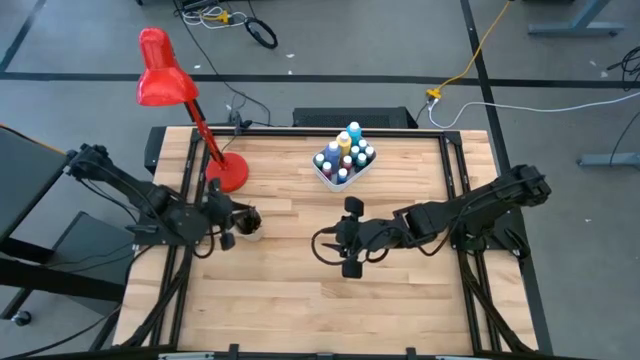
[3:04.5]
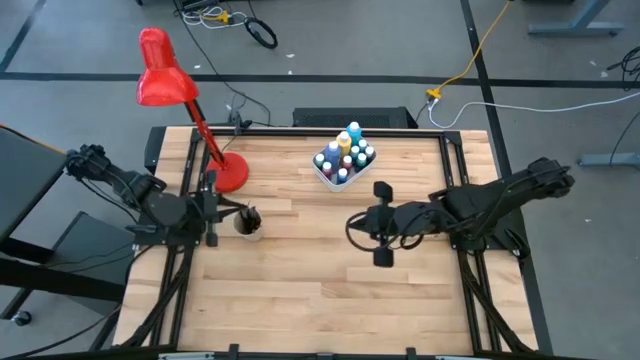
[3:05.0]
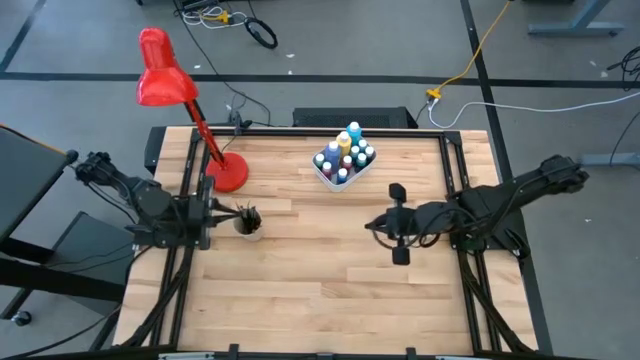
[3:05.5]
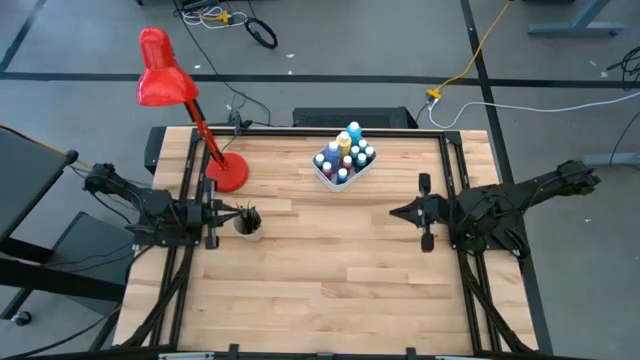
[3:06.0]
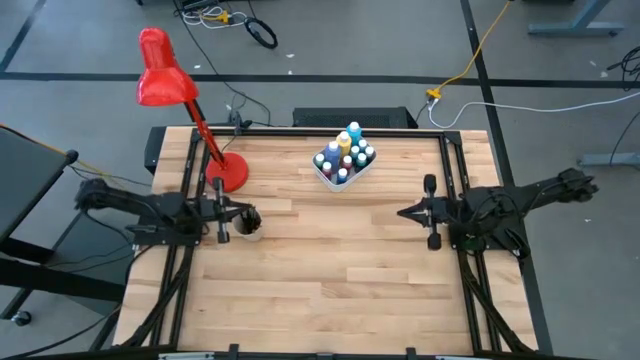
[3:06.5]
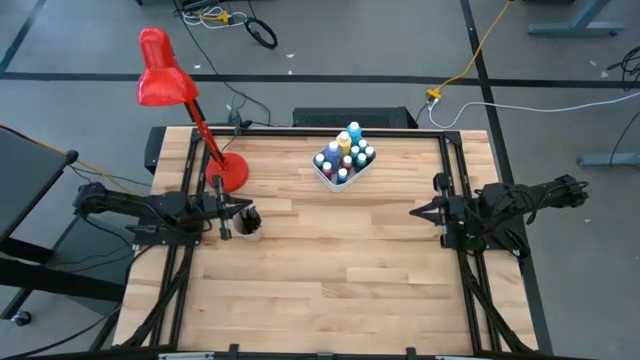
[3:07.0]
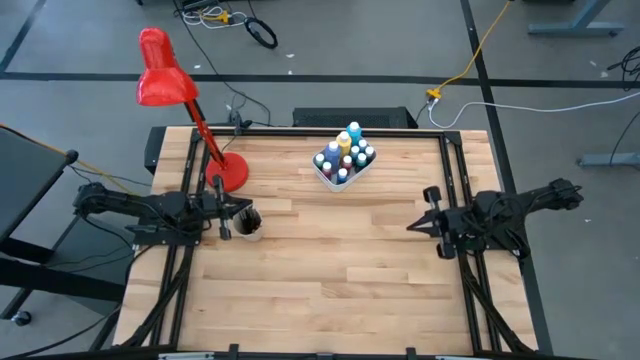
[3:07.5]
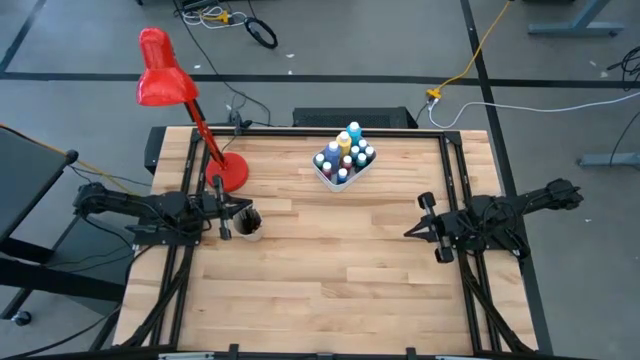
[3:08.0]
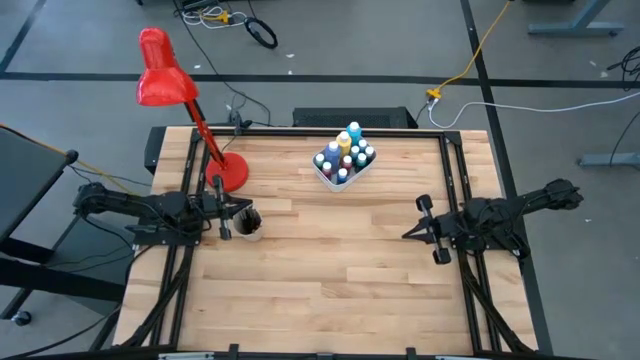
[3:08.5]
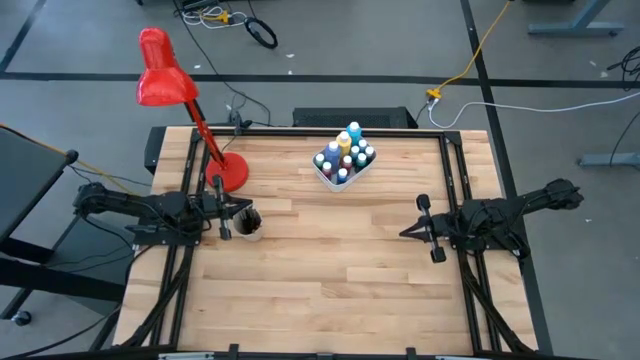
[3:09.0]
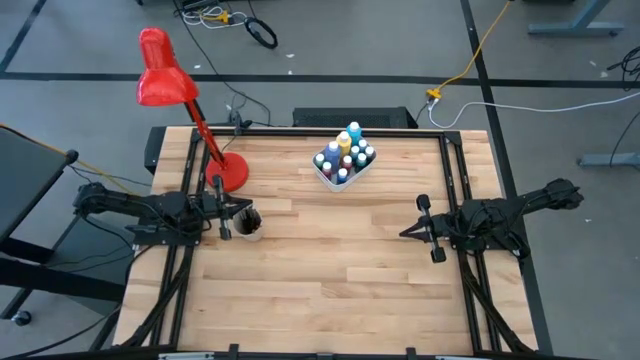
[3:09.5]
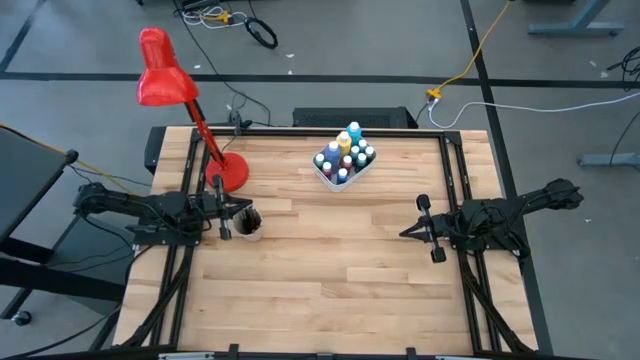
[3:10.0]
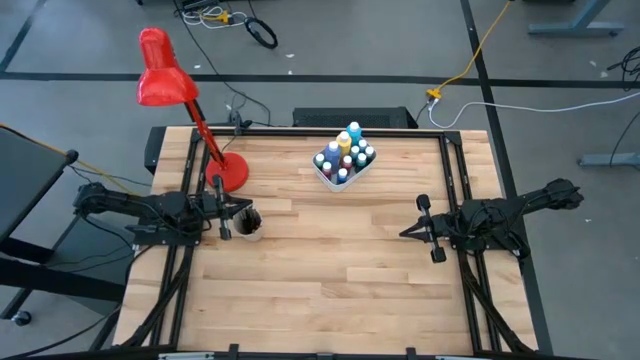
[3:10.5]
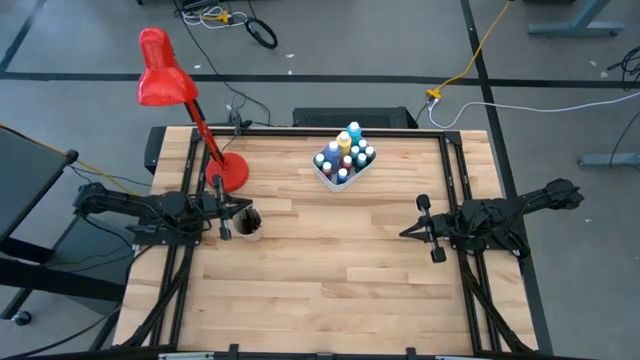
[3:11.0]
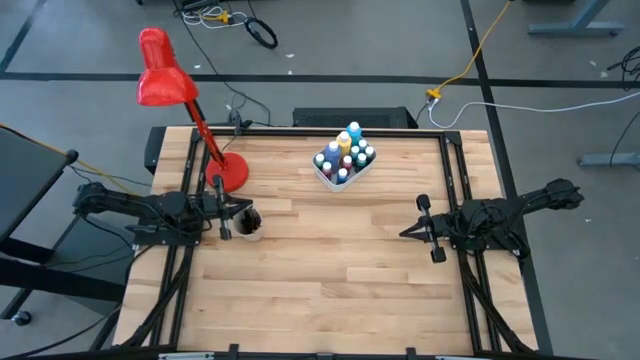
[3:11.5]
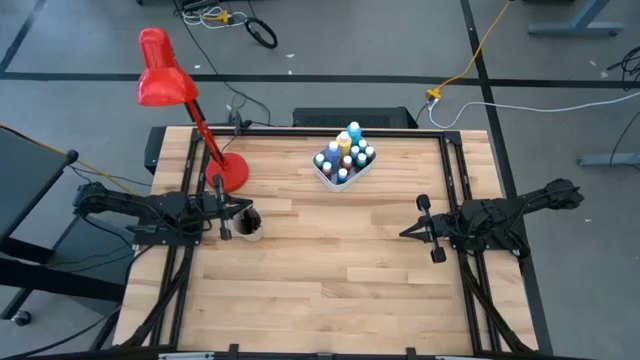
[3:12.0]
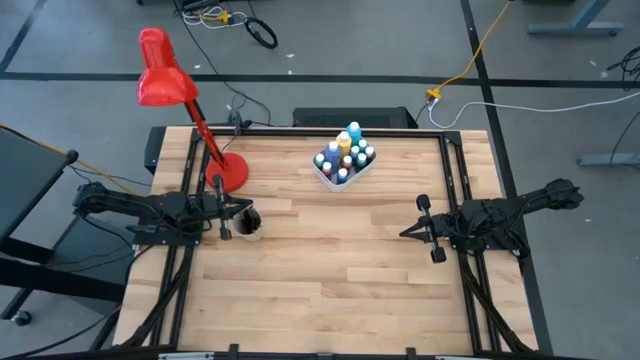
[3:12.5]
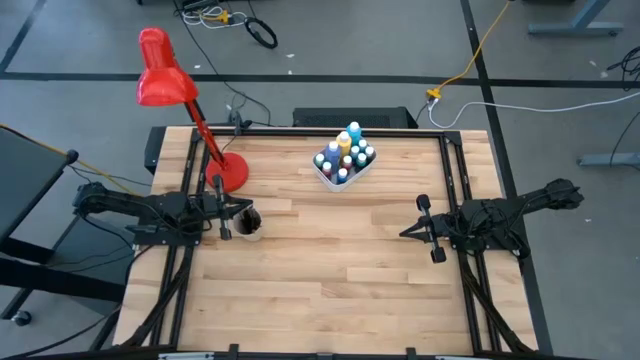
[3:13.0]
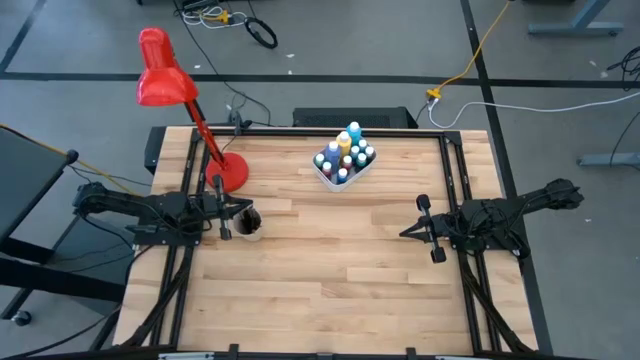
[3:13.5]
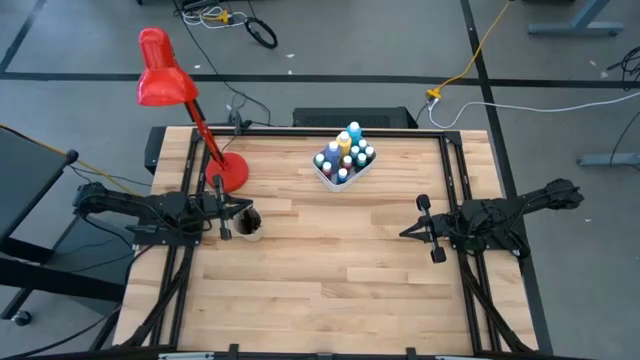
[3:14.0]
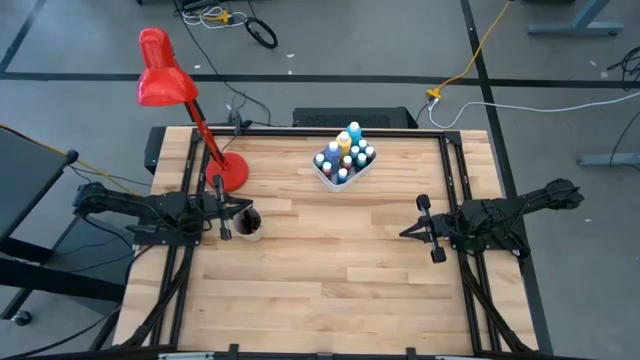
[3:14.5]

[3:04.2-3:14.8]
Task: Pick & Place Paint Supplies
Return to Home Position

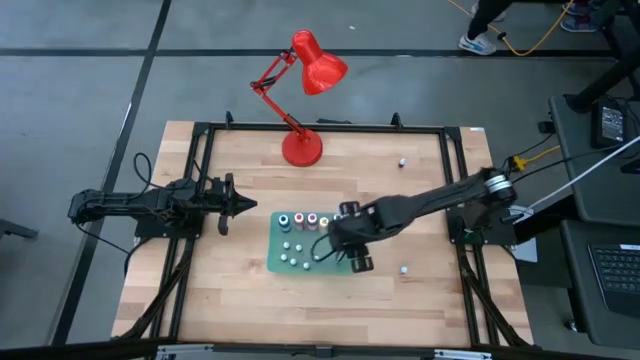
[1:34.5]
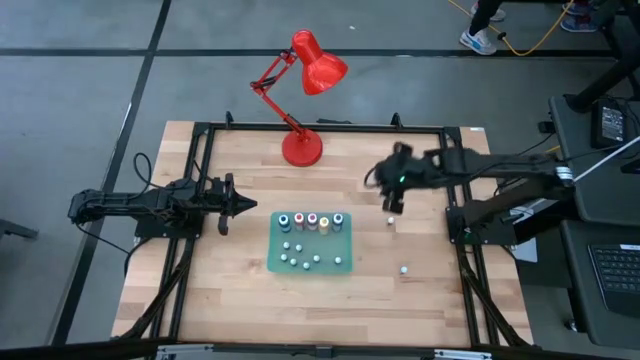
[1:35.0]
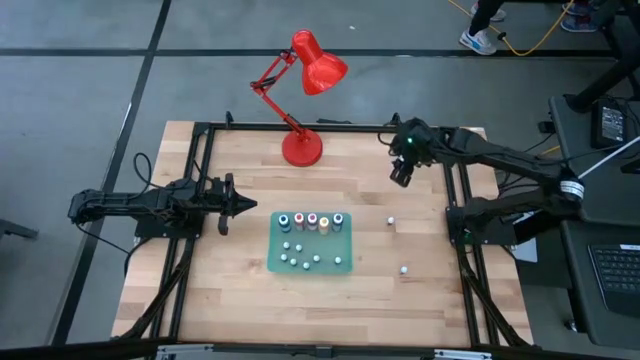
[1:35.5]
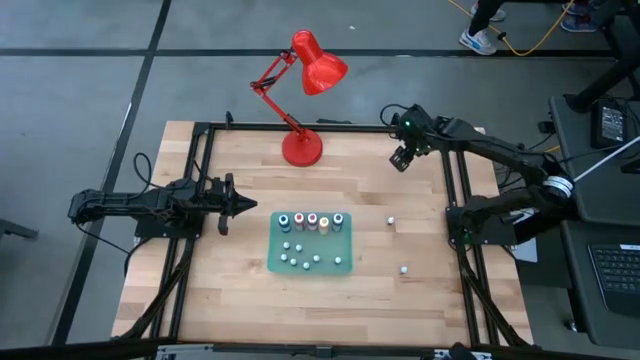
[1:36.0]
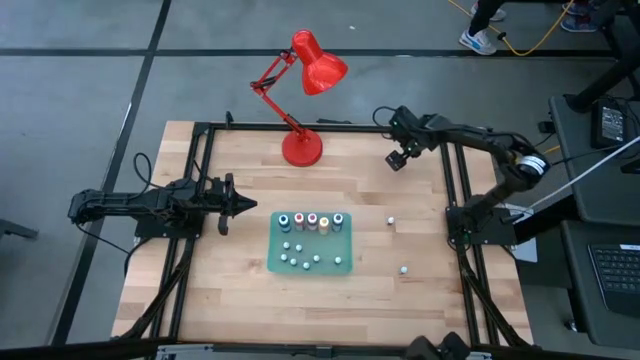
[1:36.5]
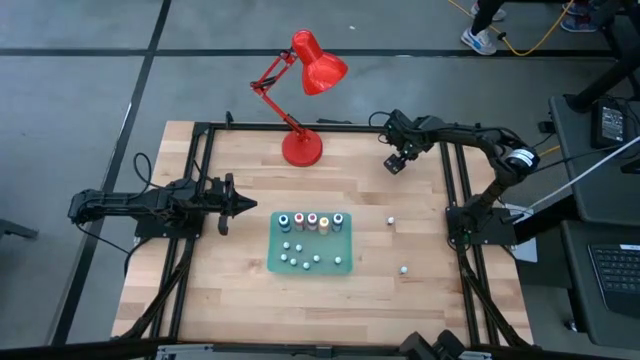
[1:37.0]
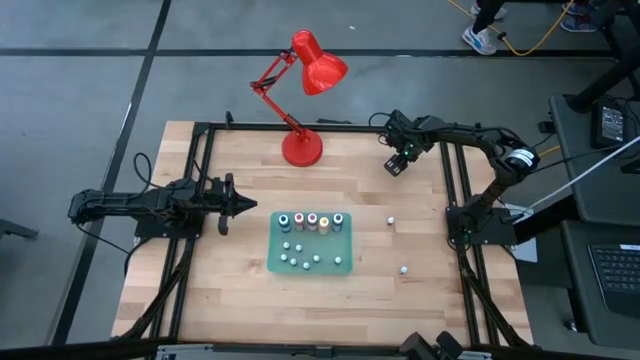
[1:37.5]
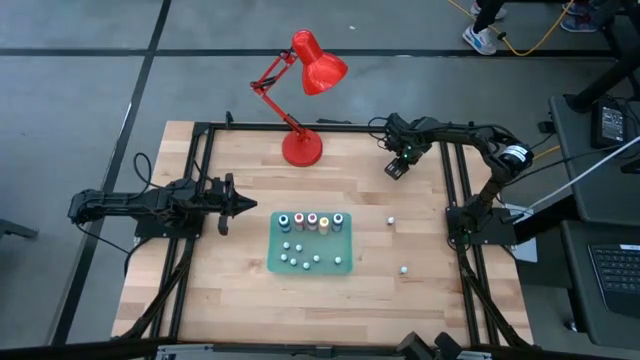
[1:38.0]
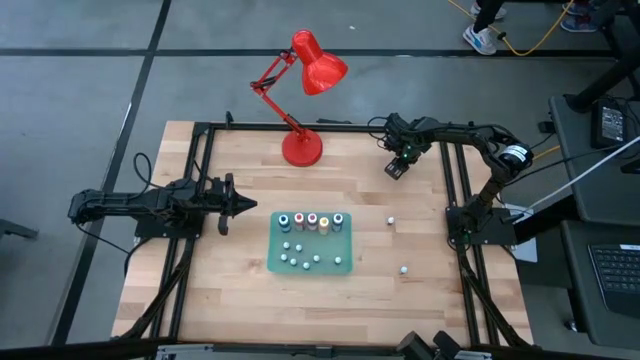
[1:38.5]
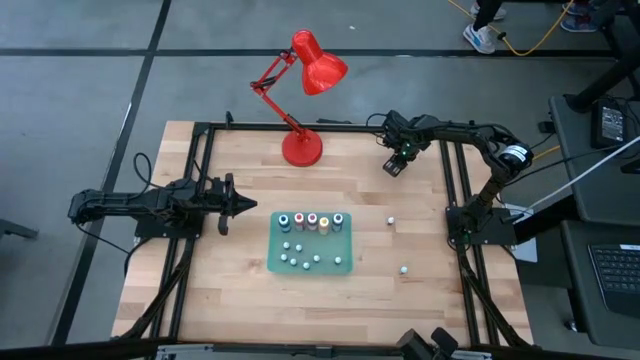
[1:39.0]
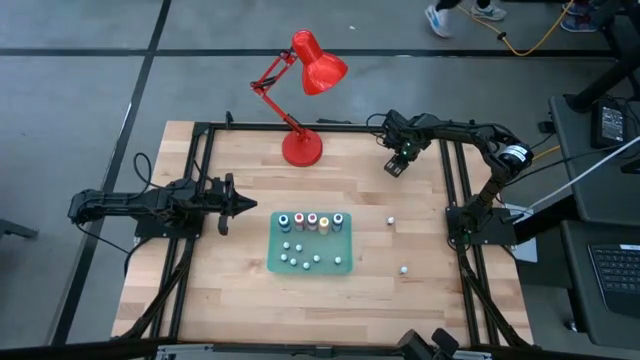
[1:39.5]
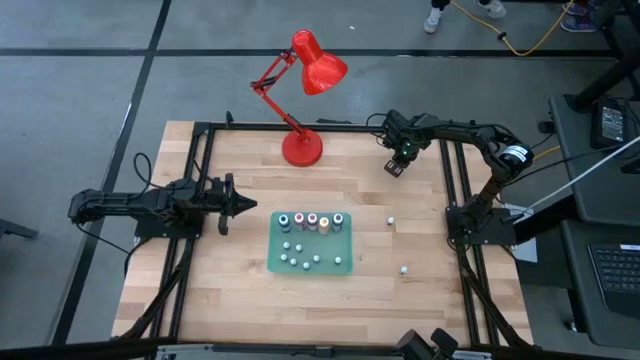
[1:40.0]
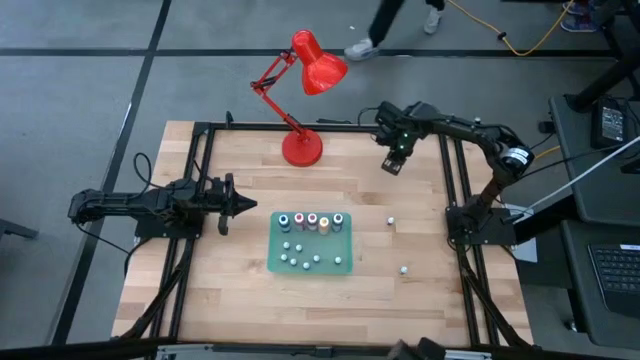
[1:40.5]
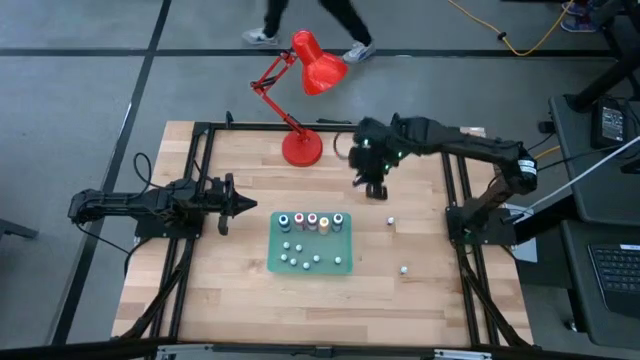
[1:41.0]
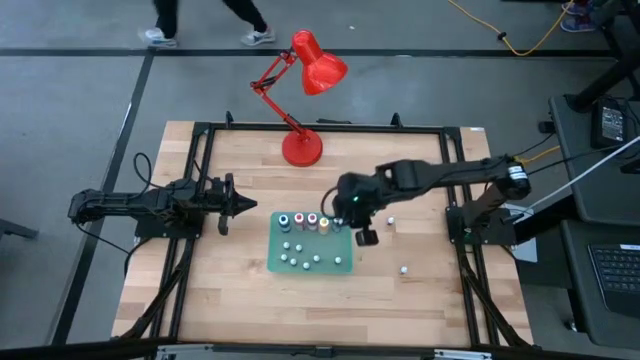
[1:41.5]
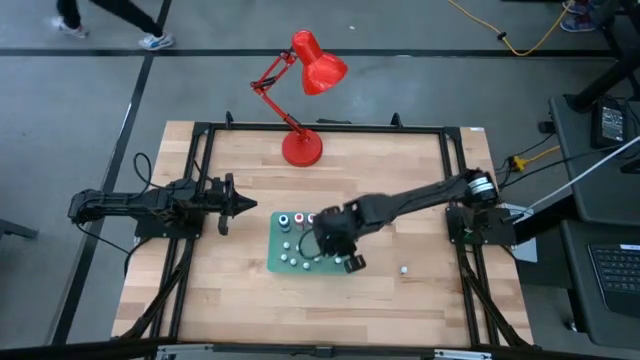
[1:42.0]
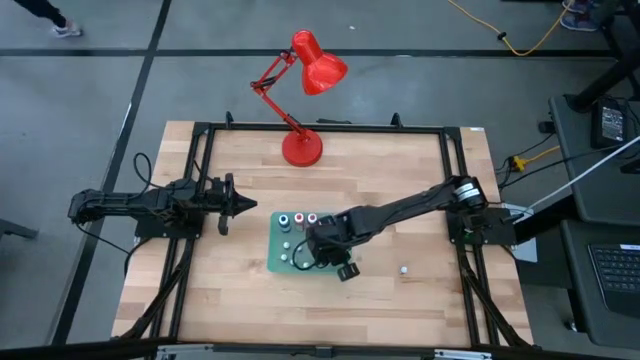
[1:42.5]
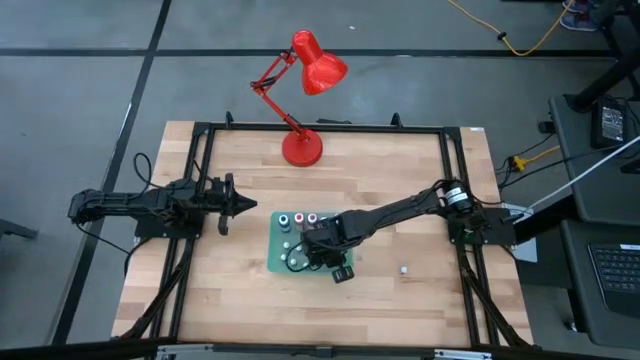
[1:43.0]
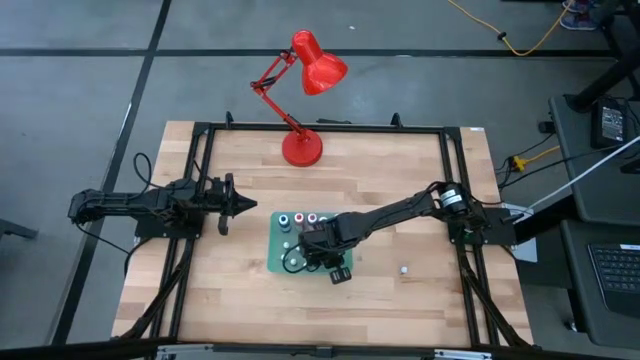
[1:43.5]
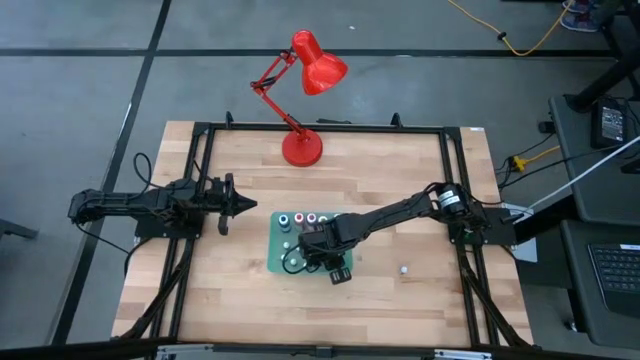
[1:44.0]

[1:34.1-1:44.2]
Task: Pick & Place food coloring
Put the small black bottle into the green bin
